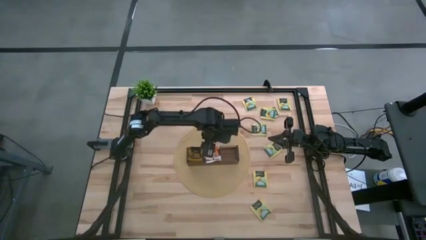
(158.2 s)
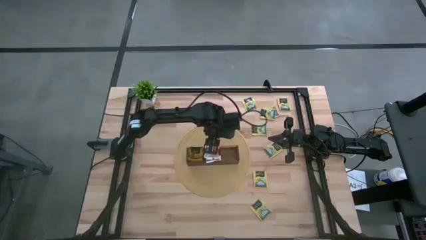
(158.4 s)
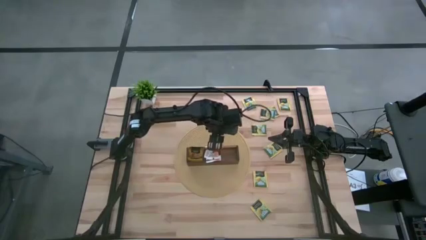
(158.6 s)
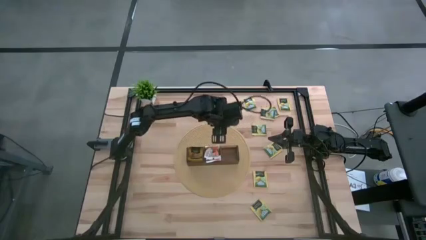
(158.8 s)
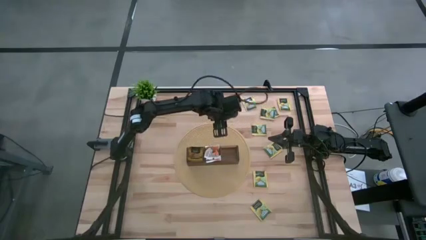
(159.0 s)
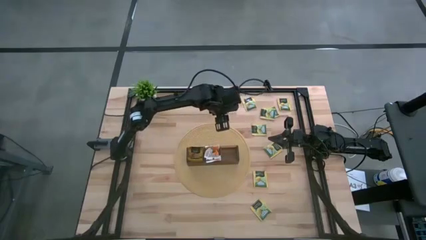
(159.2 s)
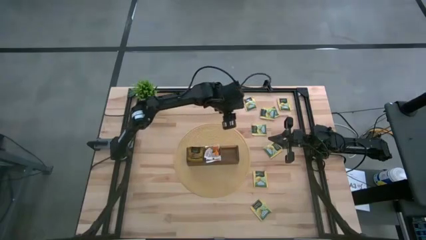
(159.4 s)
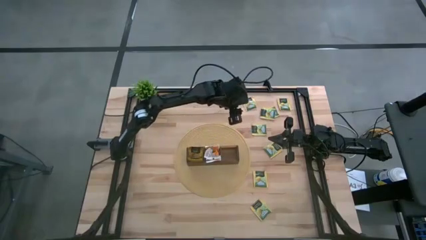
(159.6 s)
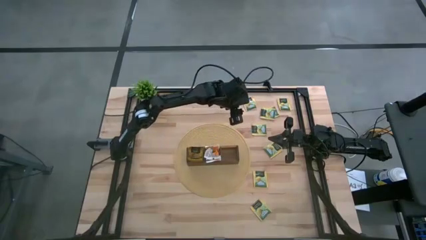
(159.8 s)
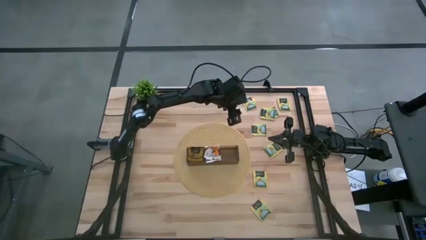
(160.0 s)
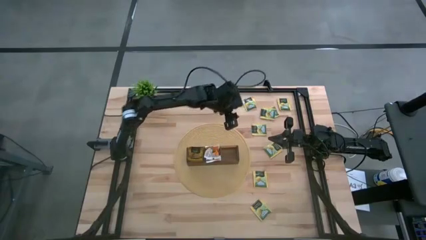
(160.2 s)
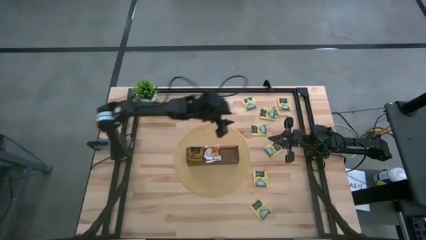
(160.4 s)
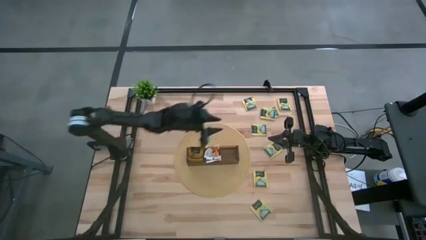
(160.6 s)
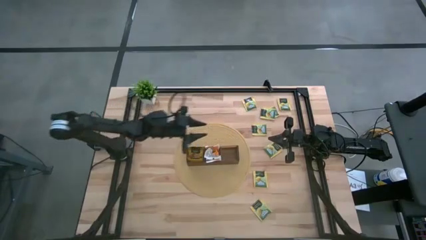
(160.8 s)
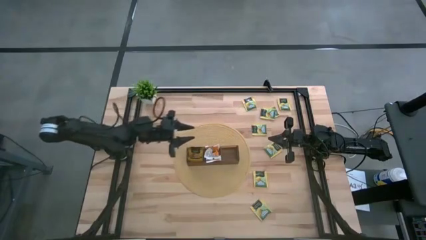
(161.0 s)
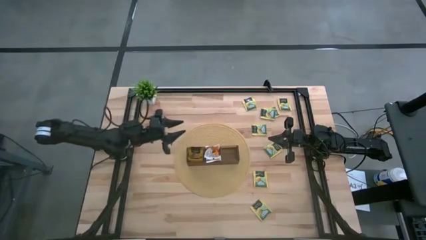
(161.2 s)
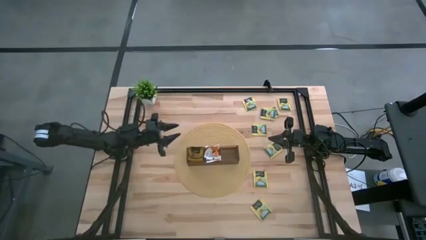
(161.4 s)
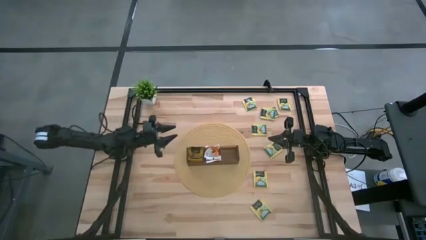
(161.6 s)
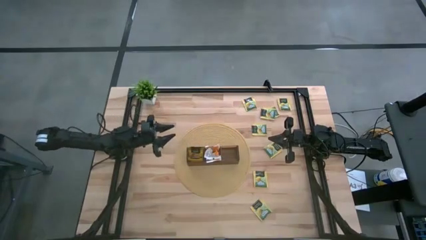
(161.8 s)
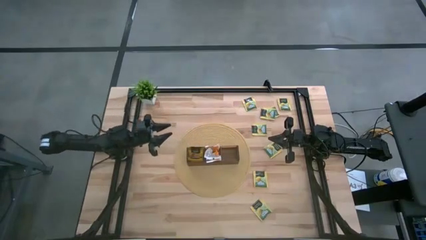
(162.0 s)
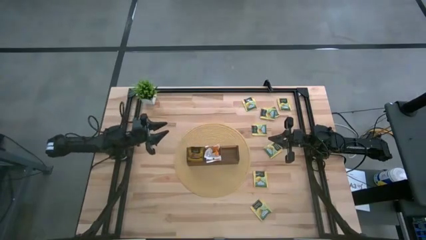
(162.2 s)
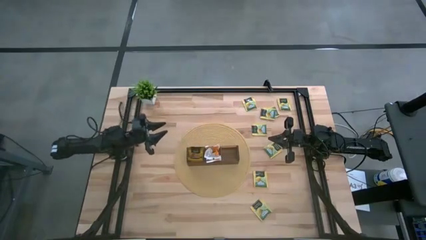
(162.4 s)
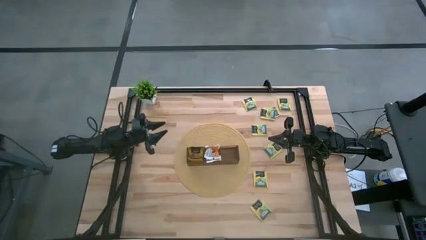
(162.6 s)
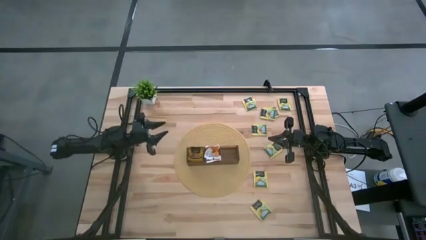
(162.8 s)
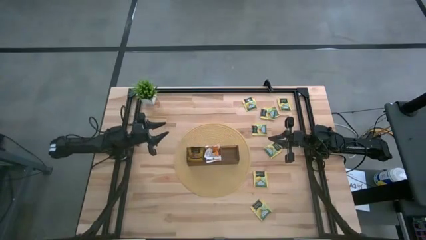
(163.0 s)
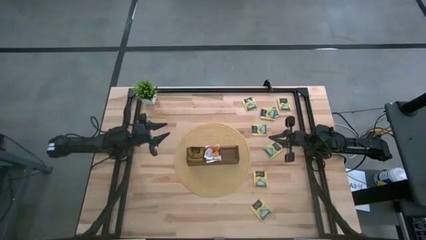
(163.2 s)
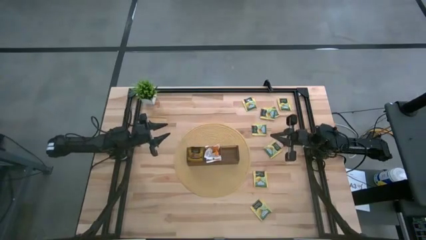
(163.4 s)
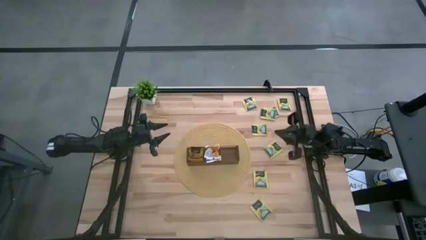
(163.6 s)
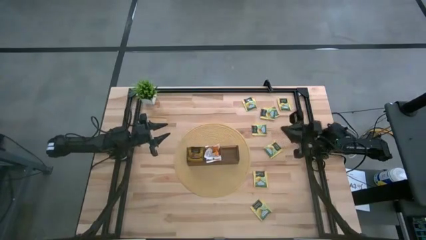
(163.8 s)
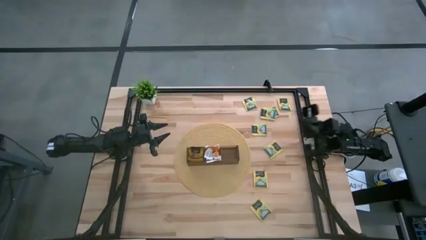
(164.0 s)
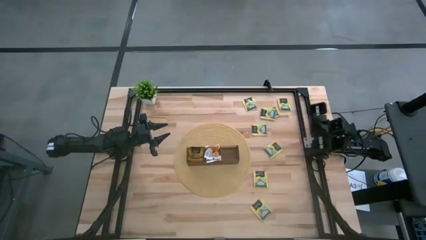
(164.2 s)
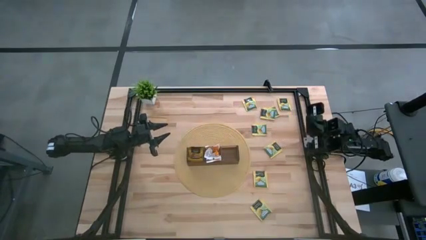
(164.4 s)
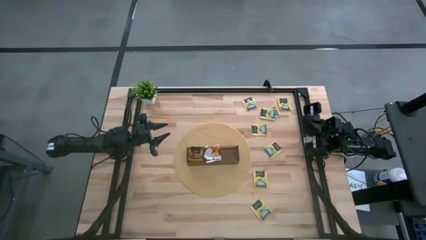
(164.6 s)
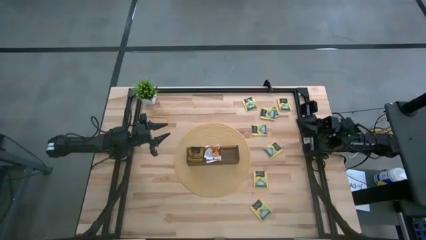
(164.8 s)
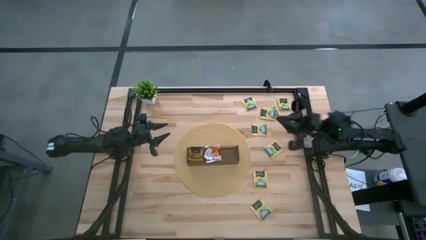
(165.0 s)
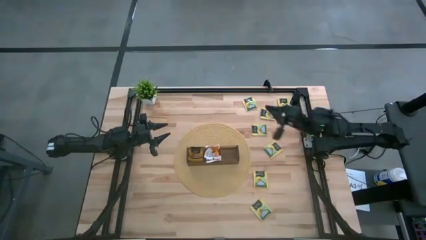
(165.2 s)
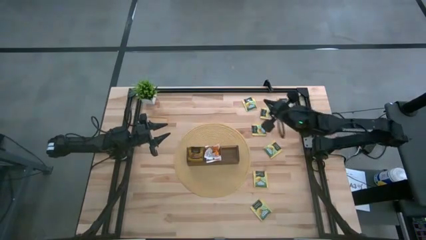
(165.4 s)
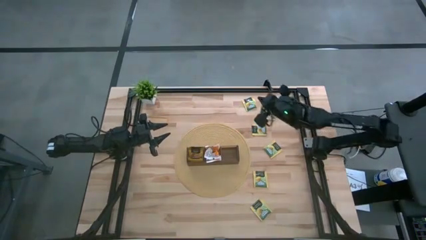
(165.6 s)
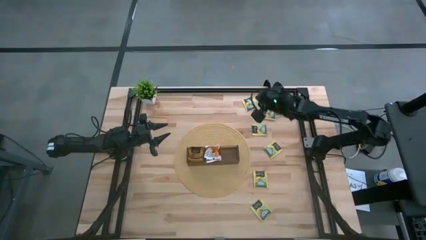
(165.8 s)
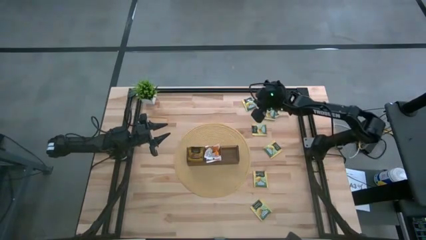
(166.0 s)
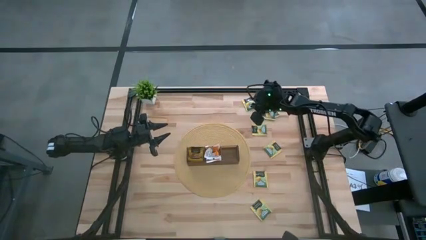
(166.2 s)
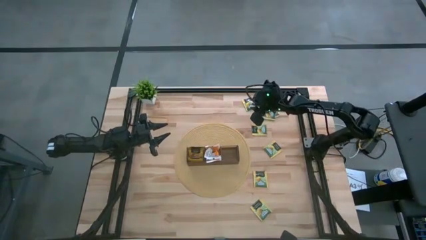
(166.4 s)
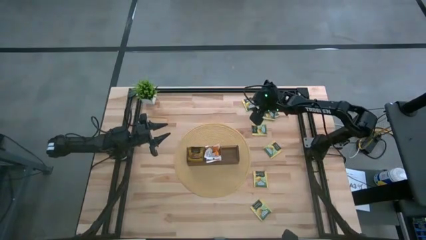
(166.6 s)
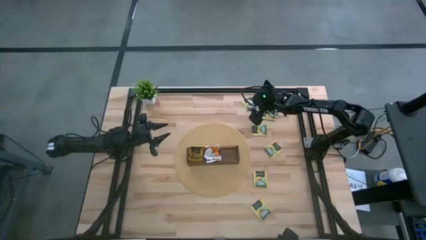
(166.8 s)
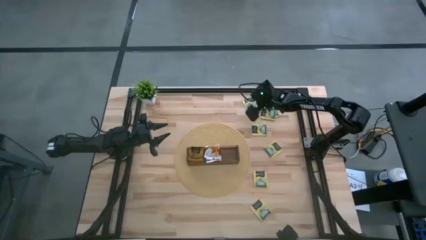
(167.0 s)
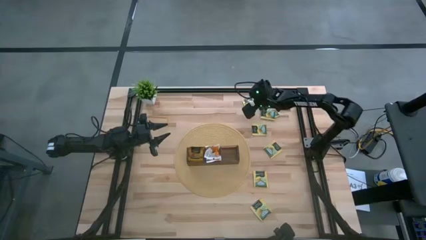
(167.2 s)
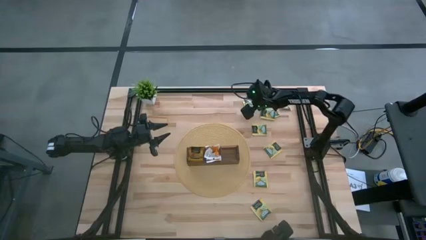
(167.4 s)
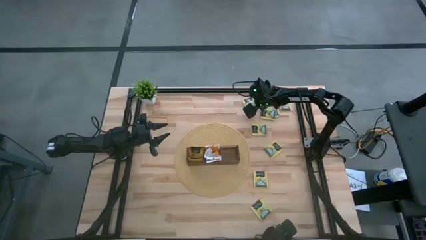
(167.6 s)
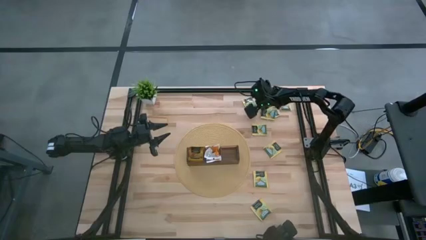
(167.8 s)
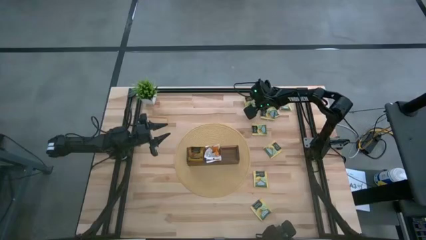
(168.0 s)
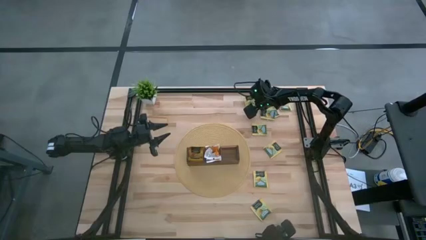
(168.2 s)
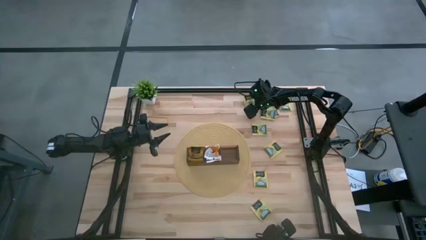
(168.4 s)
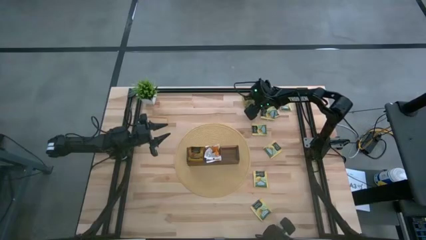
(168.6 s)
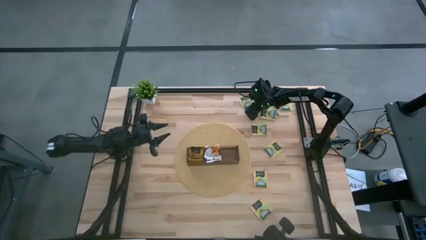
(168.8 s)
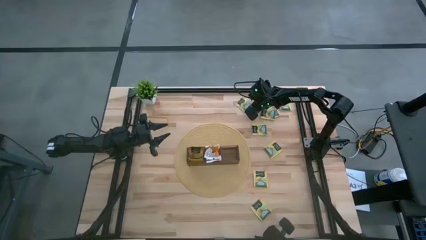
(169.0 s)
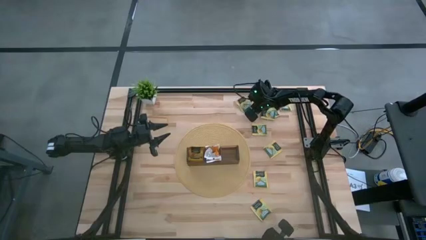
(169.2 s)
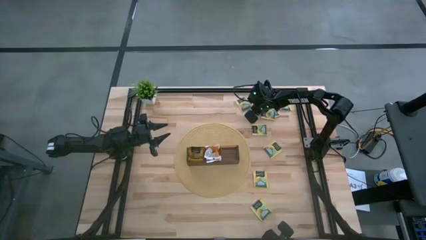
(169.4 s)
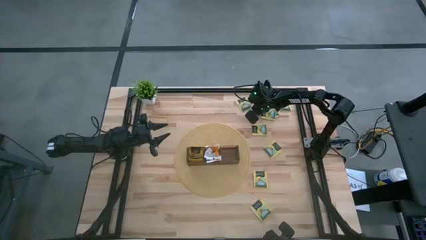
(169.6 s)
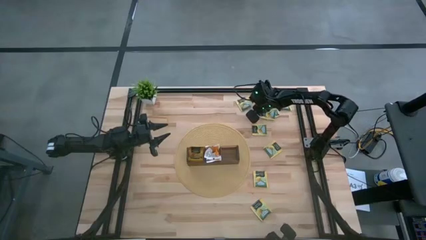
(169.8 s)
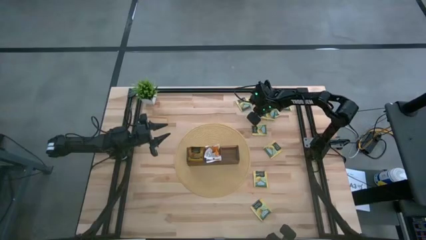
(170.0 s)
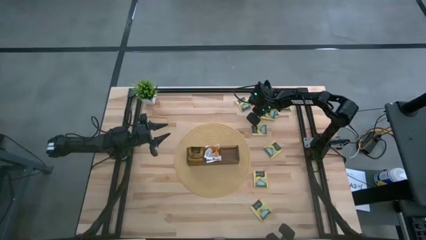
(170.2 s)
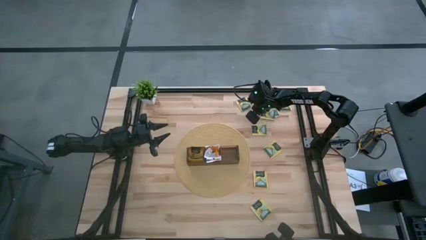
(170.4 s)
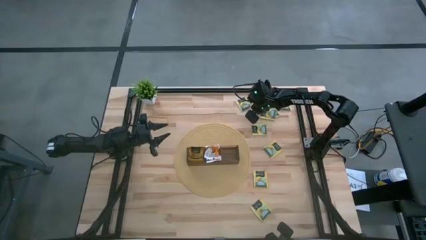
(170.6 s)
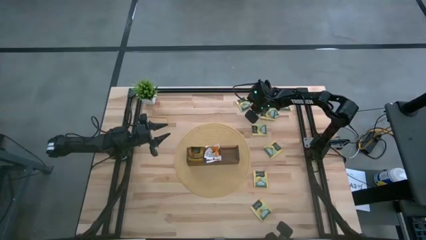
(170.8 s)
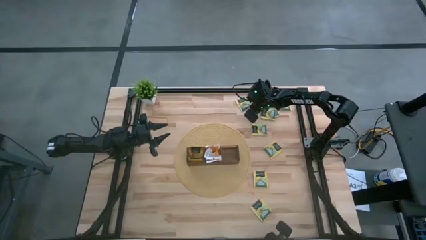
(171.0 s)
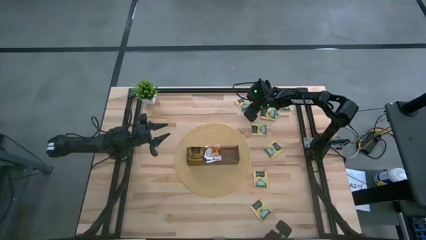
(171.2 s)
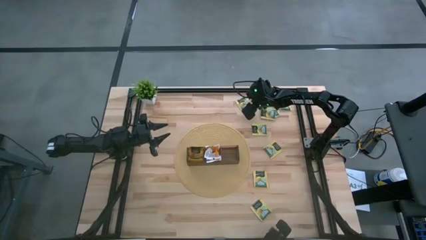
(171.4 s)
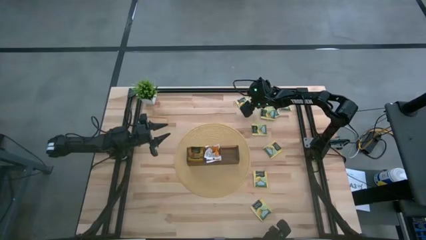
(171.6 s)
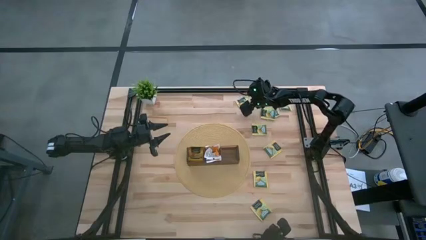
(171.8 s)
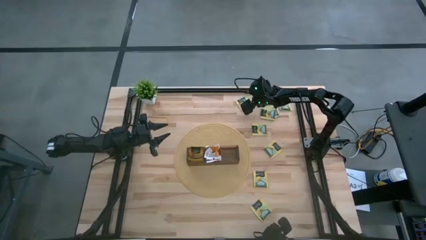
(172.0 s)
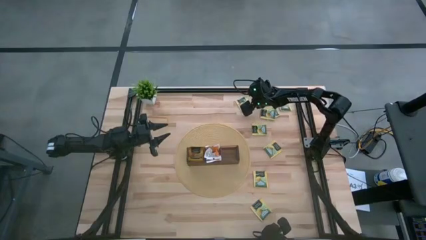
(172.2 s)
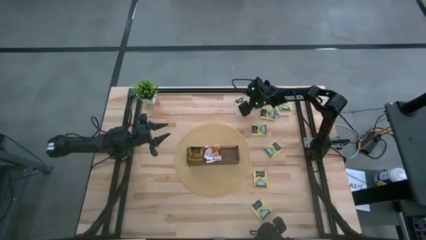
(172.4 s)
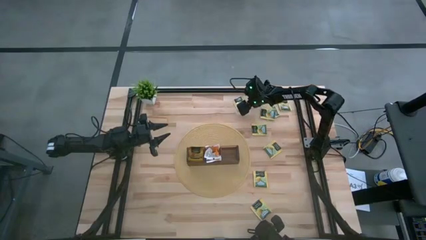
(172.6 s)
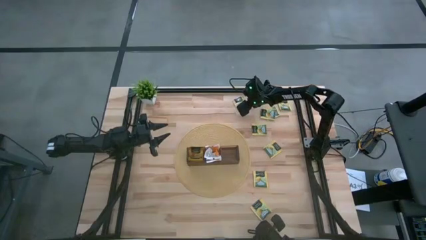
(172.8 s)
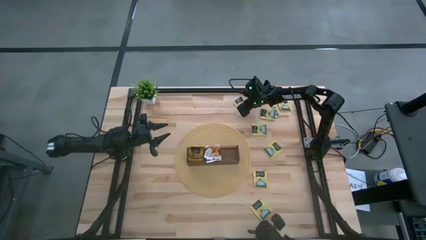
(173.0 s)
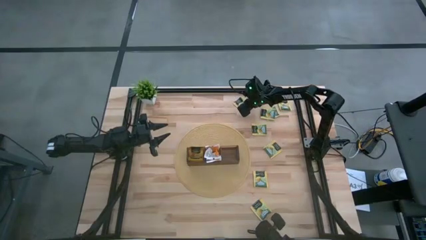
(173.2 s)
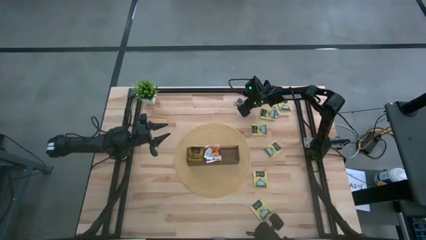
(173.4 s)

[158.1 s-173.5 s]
Task: Pick & Place Tea
Put the lemon tea sachet into the right section of the wooden organizer
